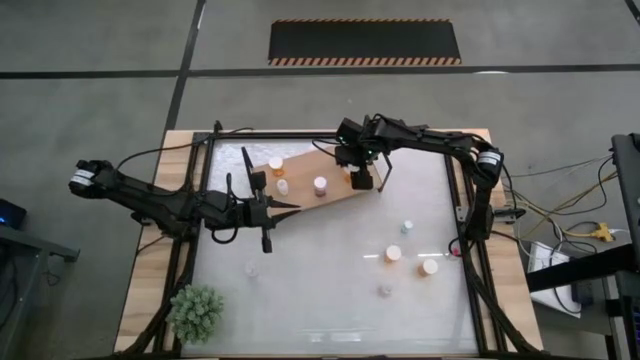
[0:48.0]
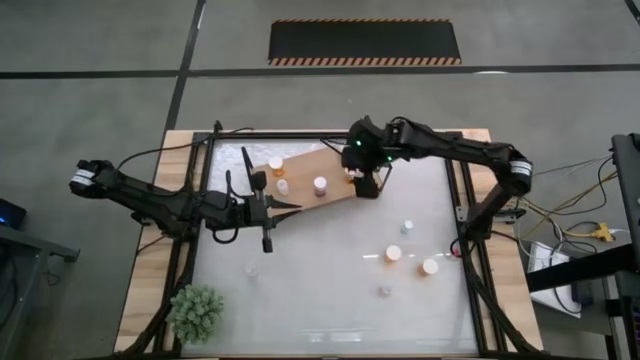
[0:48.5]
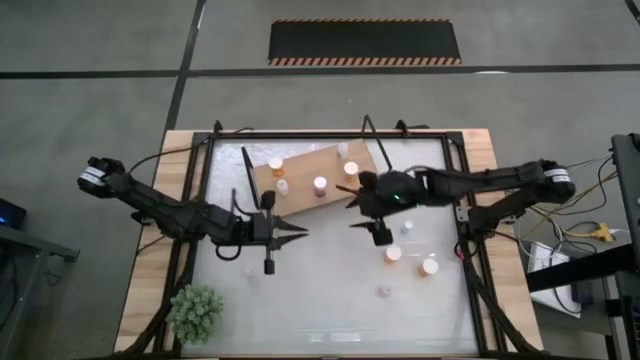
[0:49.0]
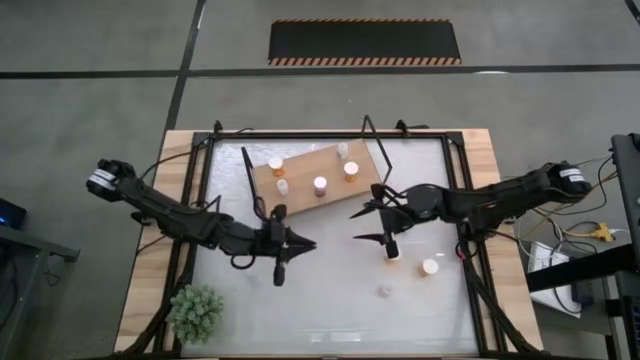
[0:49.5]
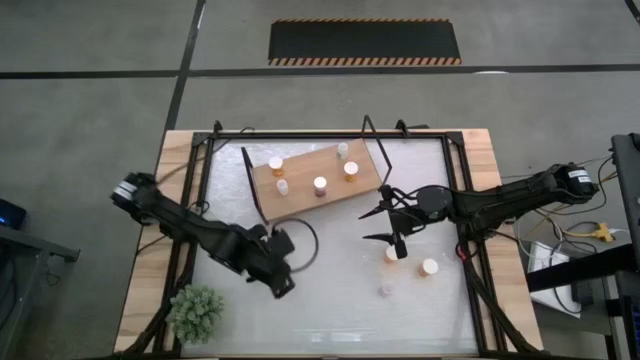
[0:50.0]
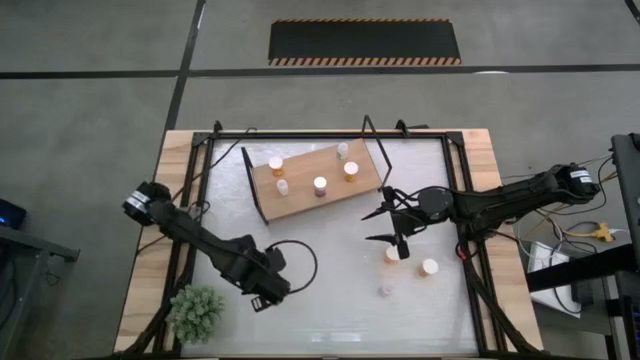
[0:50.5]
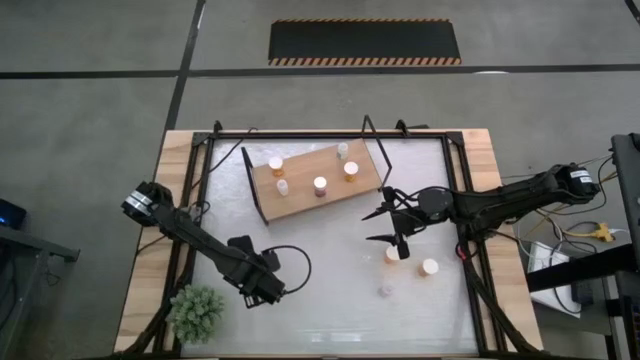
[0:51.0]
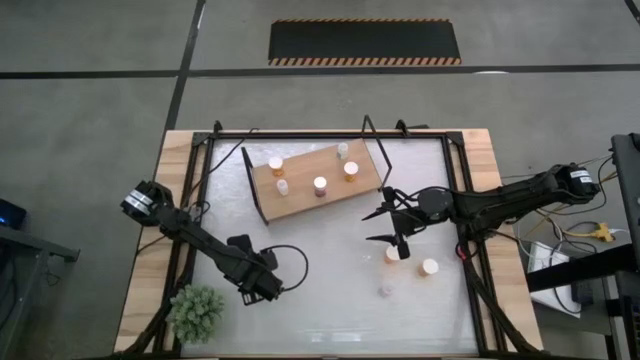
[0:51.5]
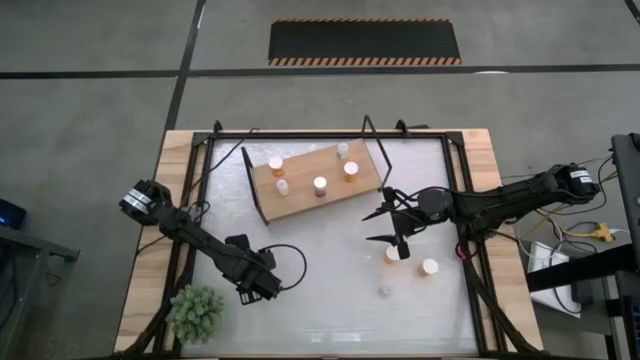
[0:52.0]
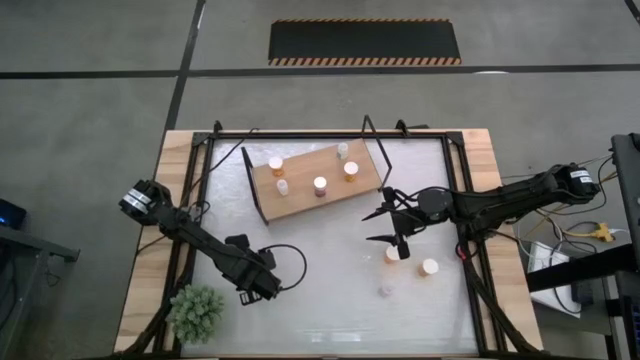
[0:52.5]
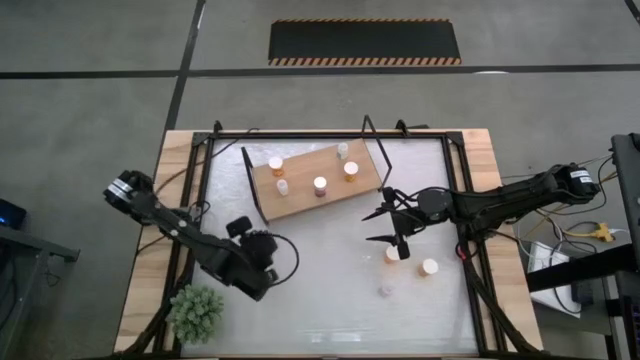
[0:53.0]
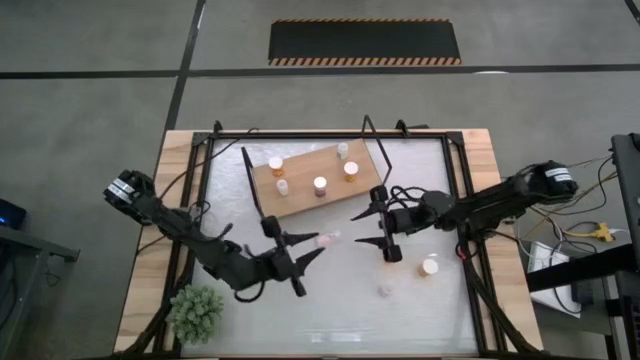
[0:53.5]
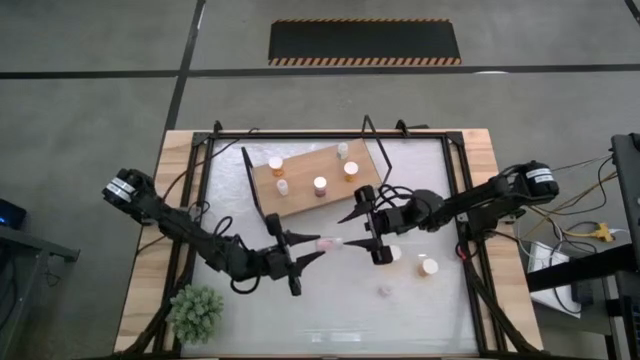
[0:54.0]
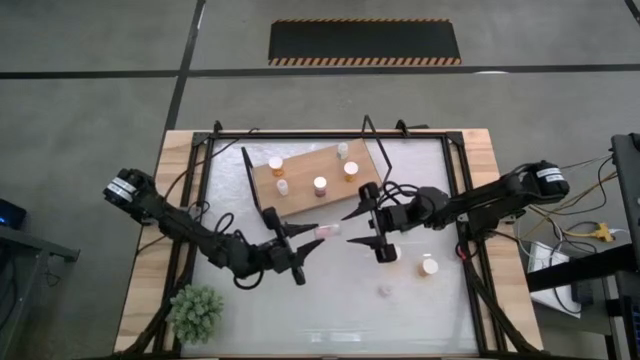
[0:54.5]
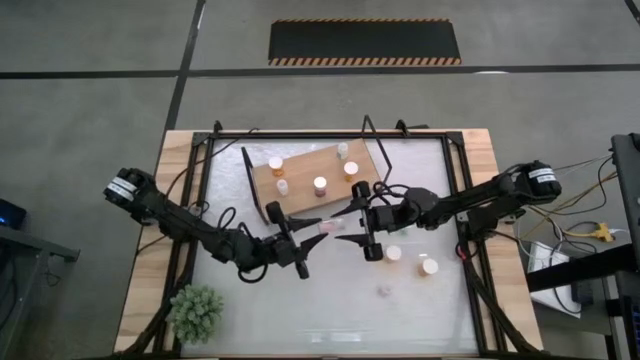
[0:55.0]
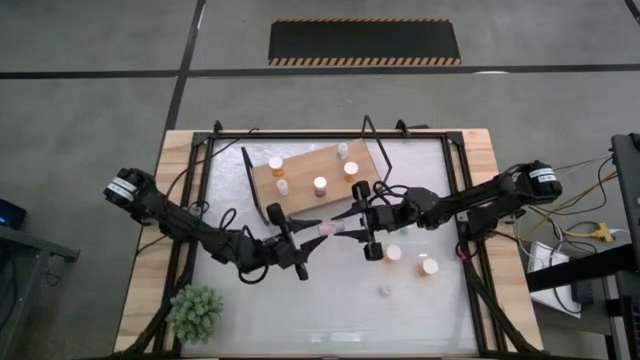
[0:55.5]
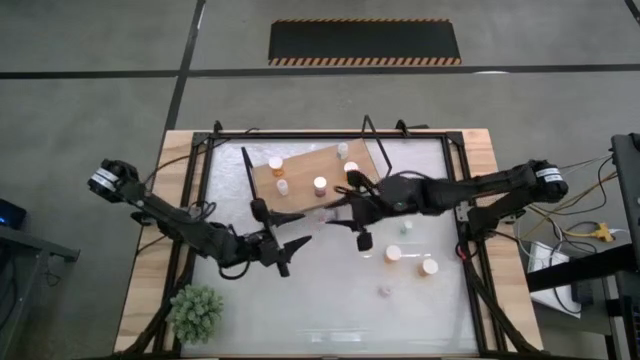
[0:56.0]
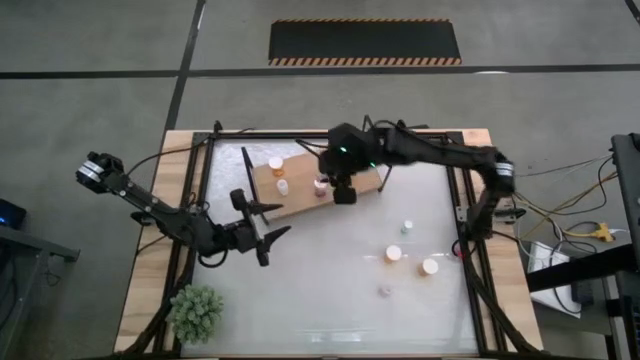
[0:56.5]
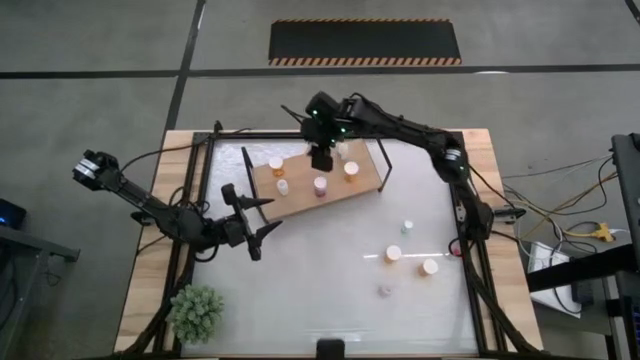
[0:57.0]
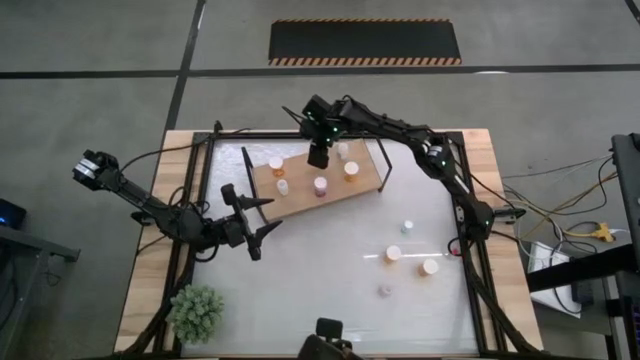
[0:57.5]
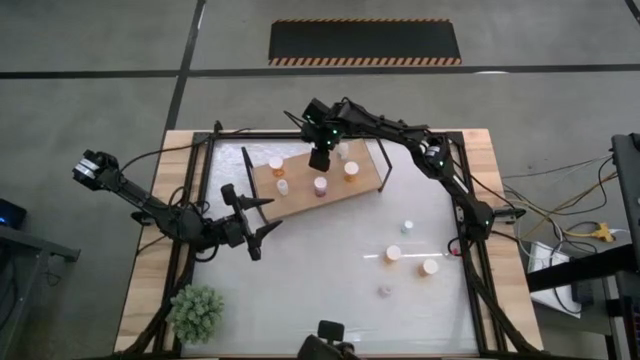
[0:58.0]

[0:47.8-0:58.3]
Task: Pick and place medicine bottles onto shelf by color
Put the small pink pill bottle on the shelf

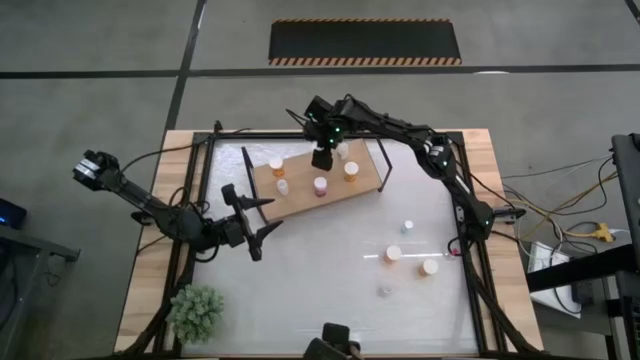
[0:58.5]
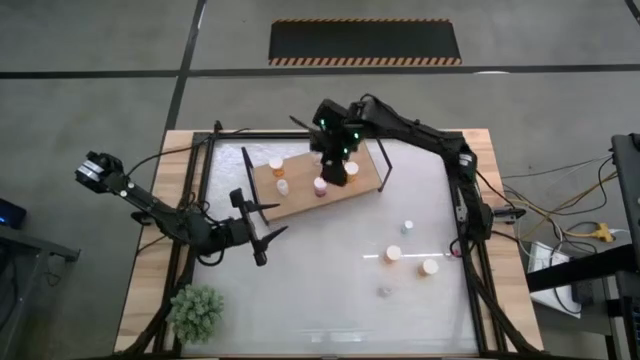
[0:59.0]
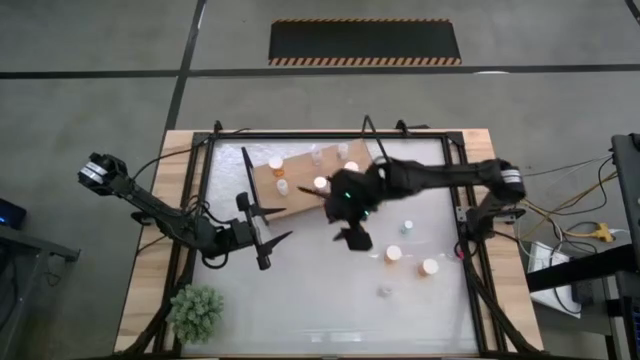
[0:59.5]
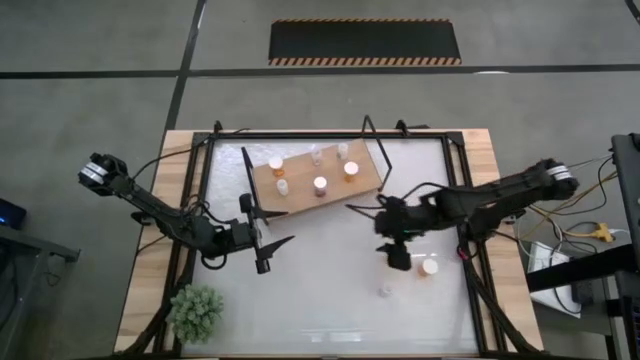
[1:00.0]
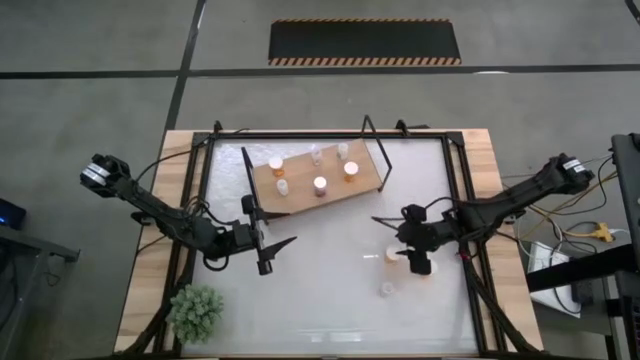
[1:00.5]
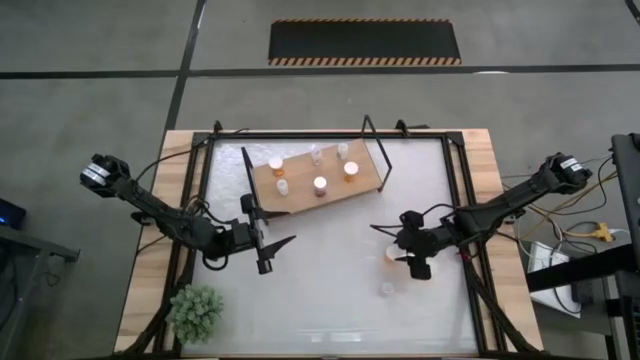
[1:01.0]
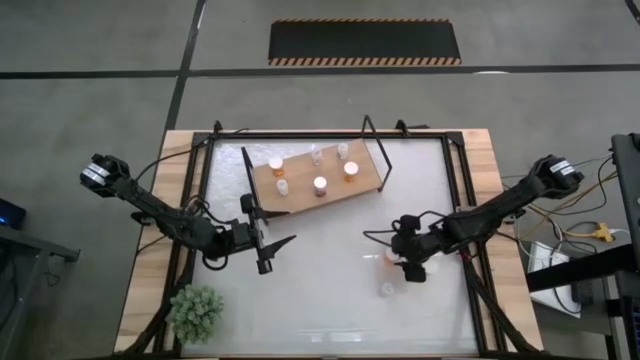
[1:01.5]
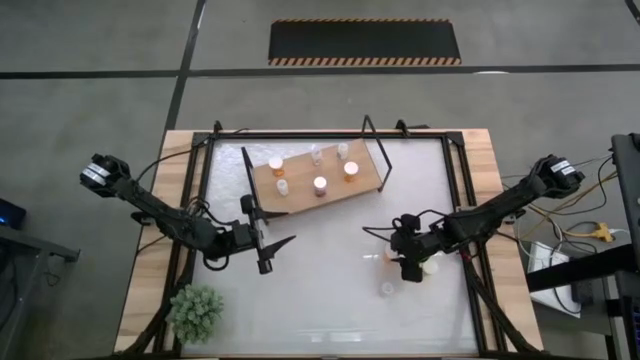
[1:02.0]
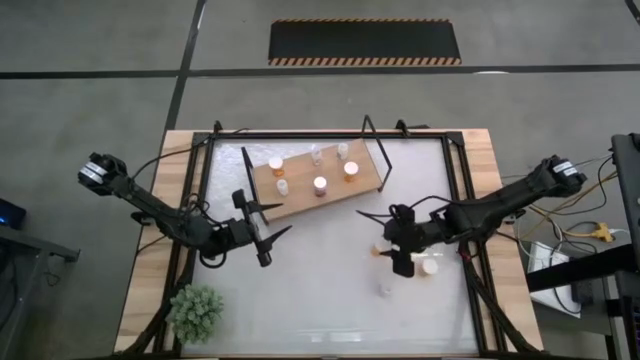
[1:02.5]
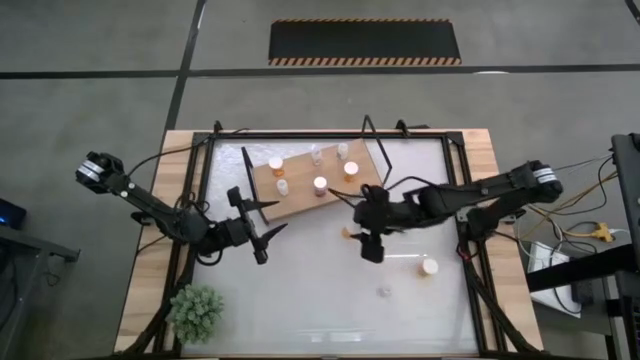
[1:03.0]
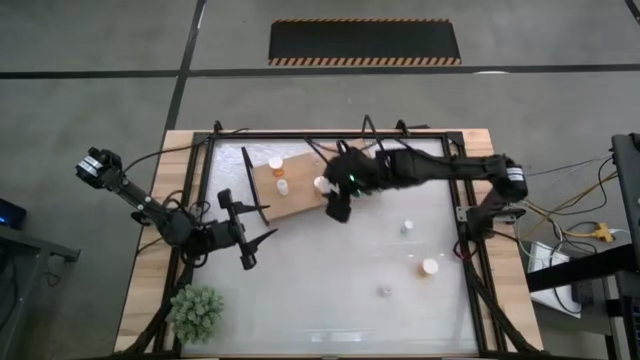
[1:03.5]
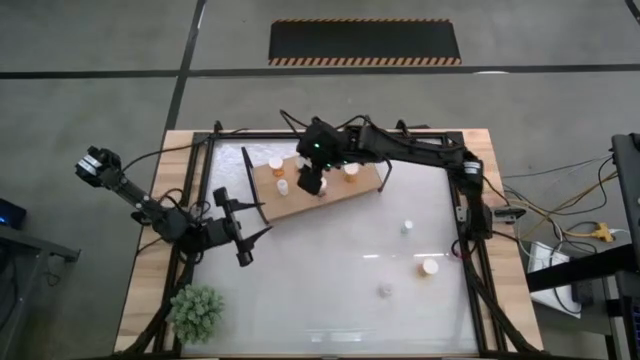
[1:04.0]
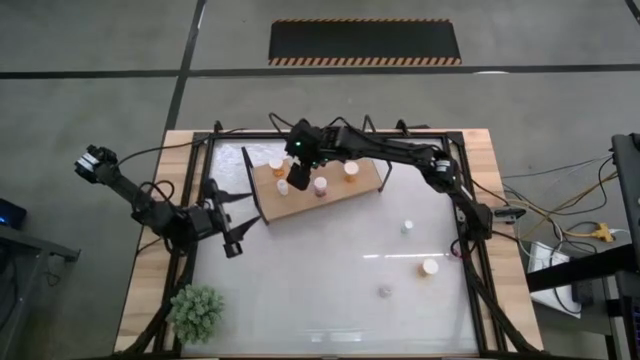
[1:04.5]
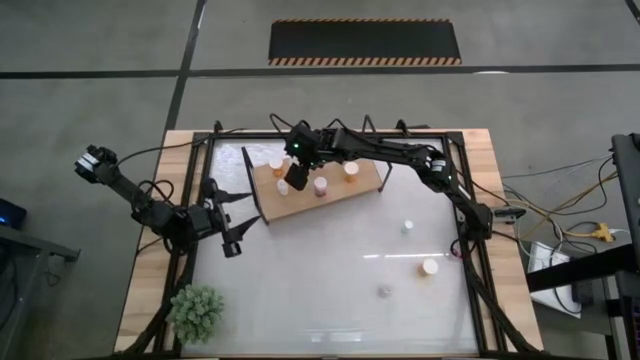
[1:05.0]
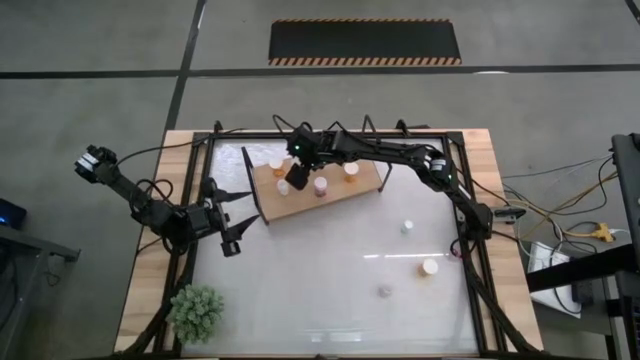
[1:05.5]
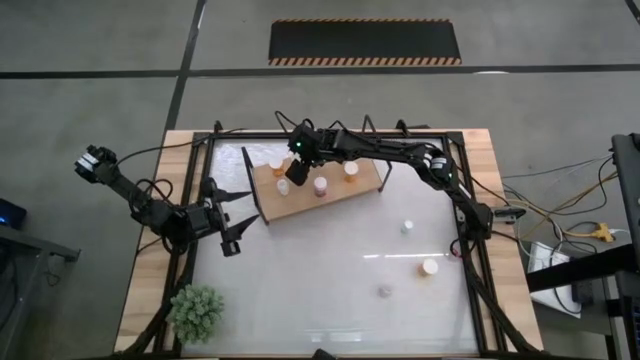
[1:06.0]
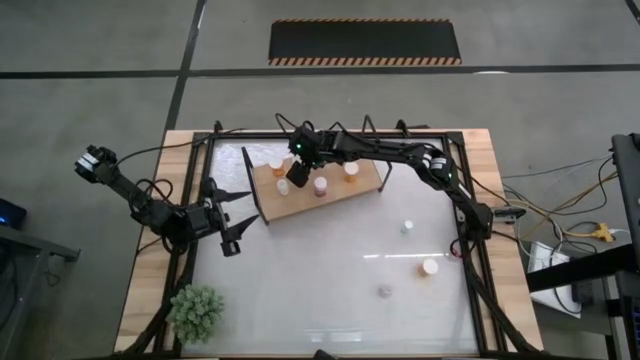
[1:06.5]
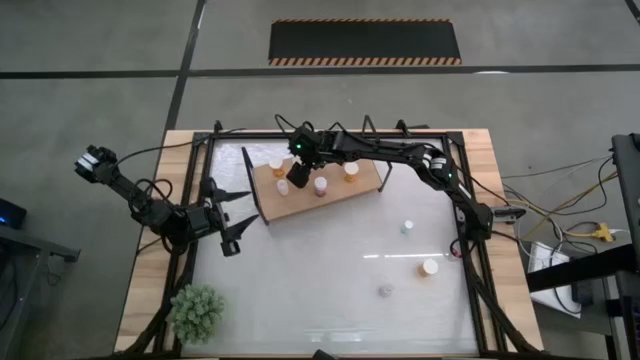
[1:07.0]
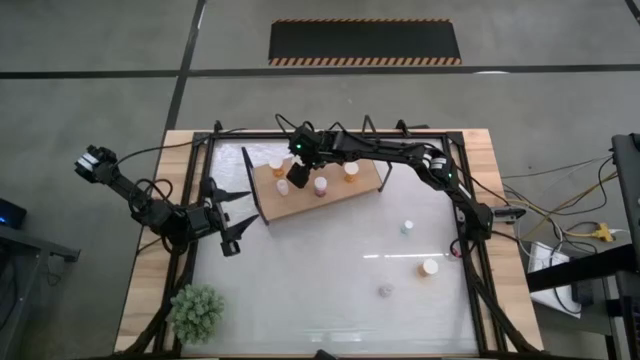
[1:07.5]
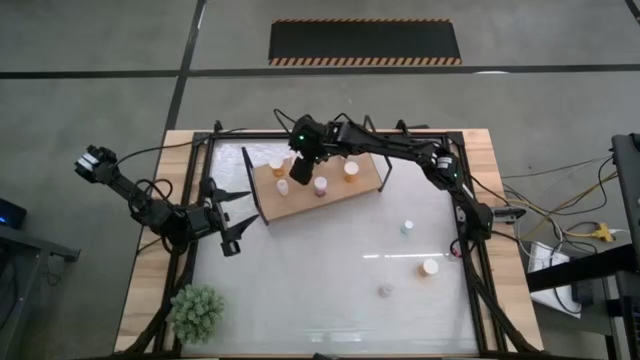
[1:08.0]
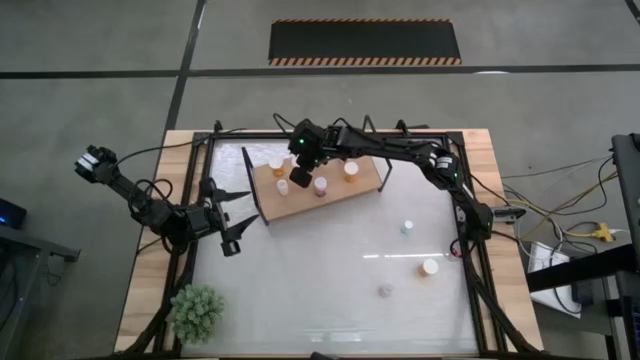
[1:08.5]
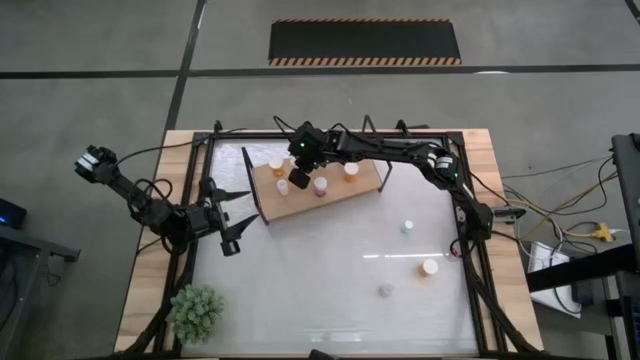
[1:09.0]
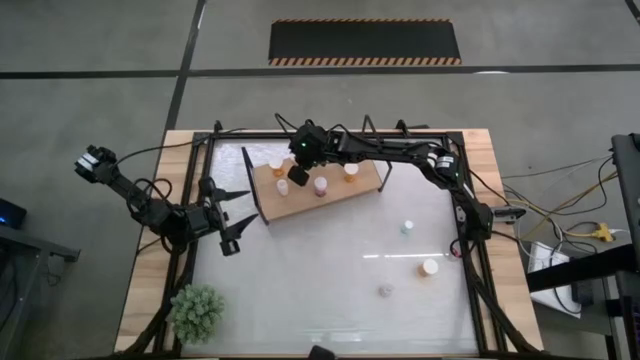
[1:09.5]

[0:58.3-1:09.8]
Put the left orange pill bottle on the shelf
